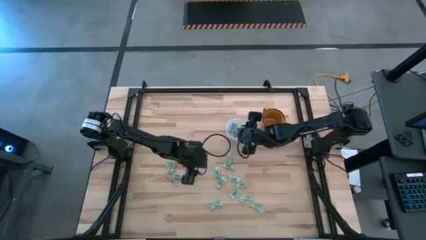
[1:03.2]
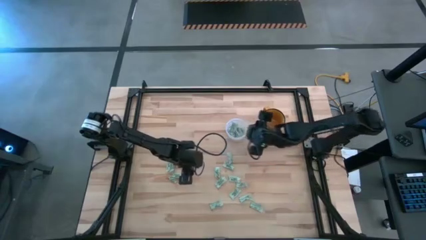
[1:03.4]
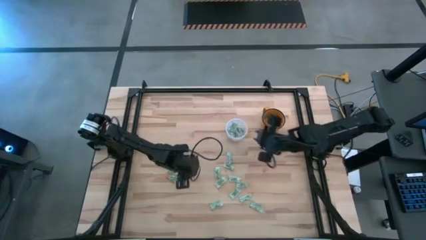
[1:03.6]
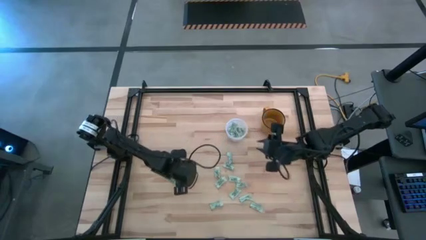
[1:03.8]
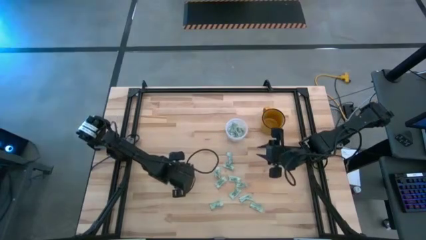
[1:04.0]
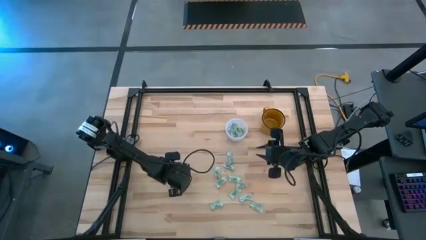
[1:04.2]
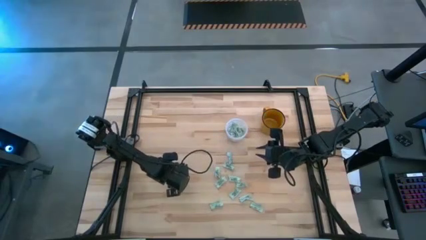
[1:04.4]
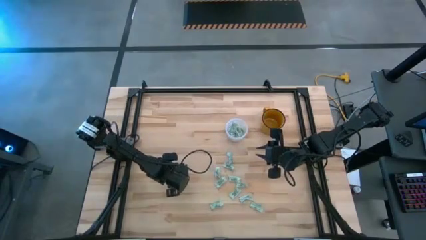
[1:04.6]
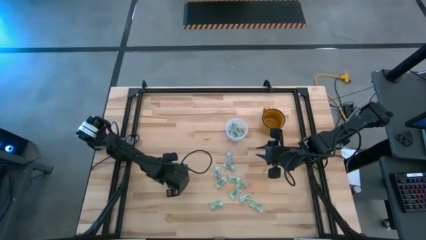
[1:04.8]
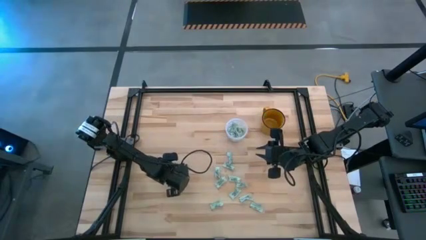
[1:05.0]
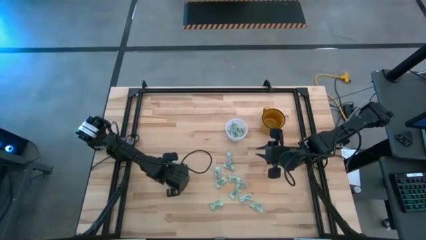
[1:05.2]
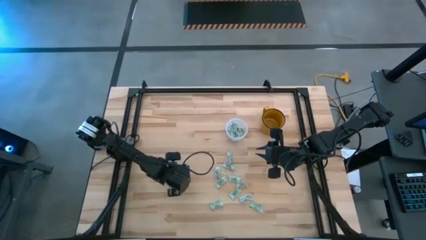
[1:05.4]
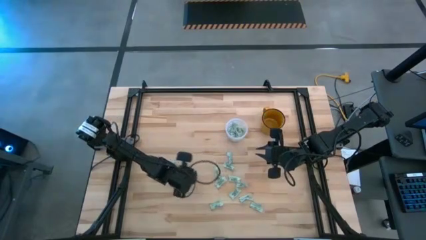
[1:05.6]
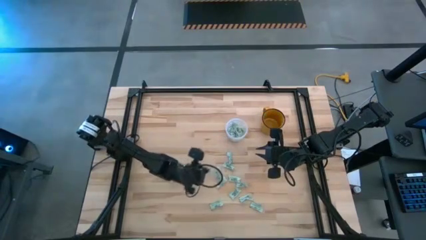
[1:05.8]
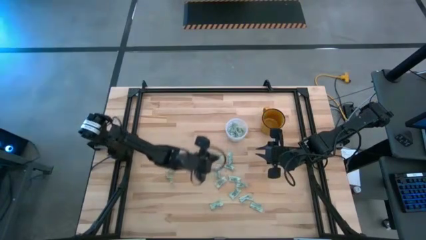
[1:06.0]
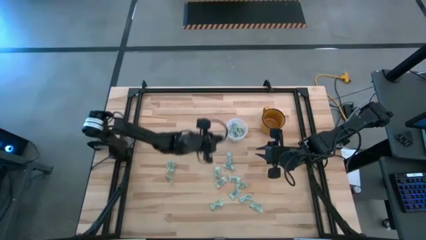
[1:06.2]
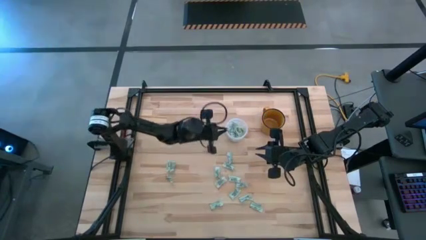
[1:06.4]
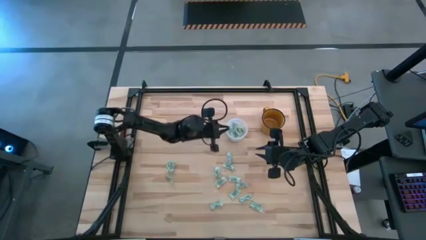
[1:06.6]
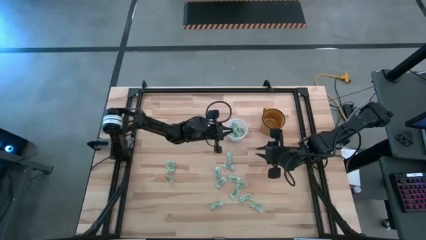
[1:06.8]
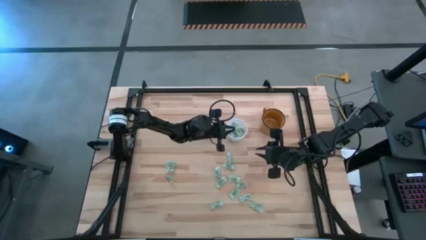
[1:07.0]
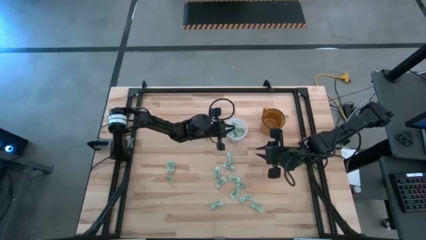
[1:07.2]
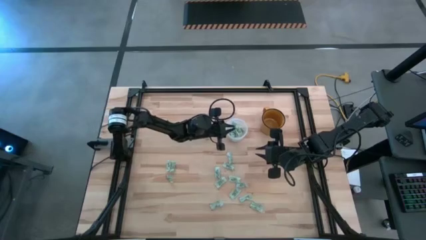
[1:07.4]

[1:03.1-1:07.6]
Task: Pick and place Stevia / Truvia into bins
Put the green stevia packet into the transparent bin

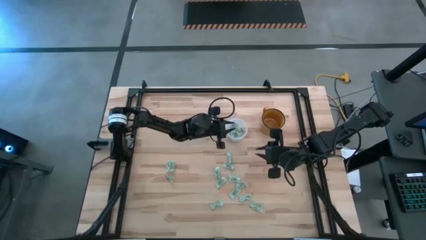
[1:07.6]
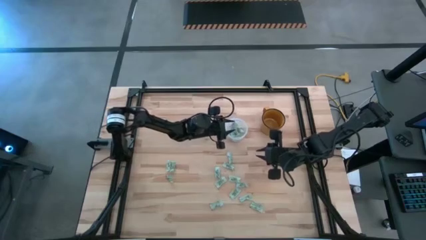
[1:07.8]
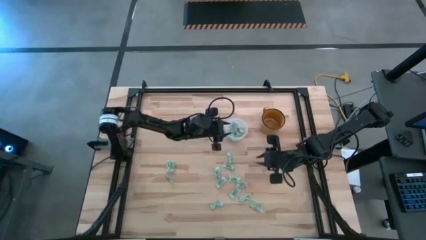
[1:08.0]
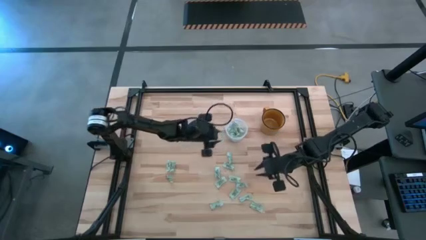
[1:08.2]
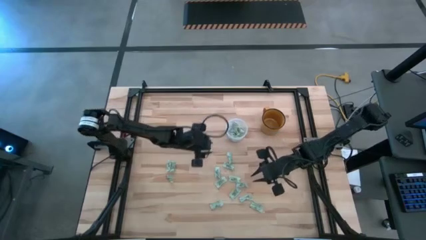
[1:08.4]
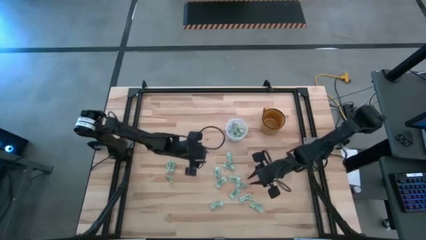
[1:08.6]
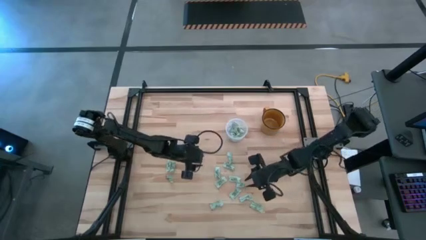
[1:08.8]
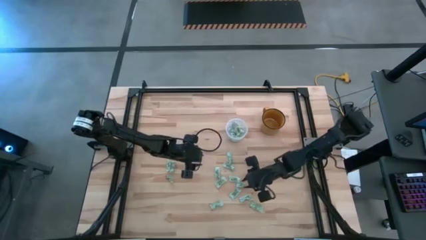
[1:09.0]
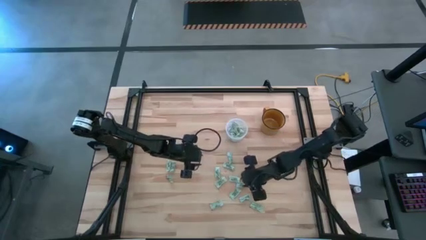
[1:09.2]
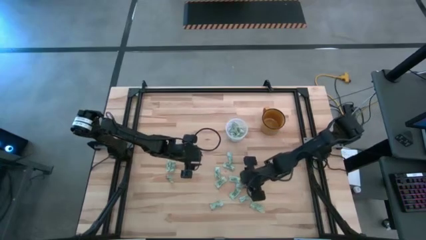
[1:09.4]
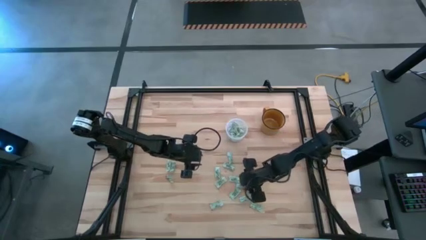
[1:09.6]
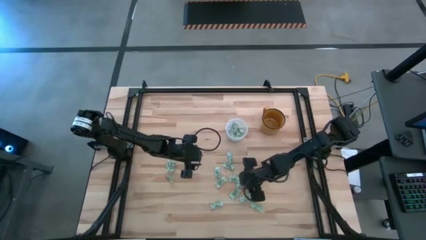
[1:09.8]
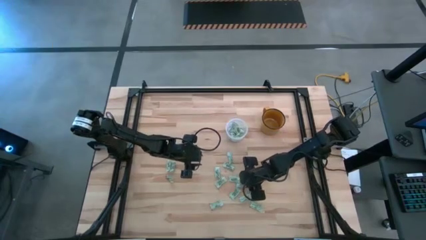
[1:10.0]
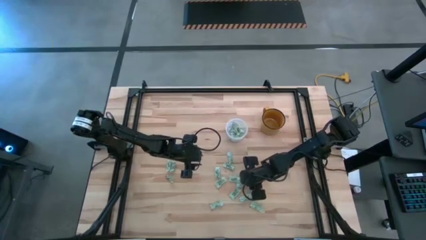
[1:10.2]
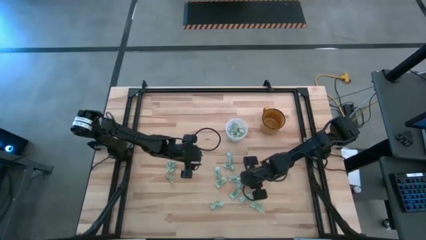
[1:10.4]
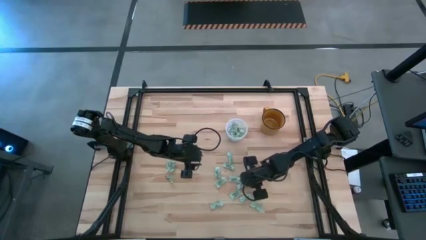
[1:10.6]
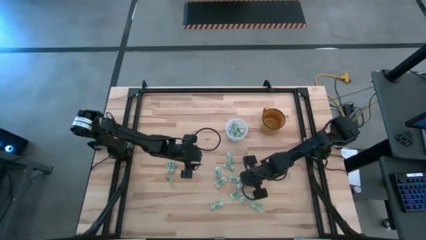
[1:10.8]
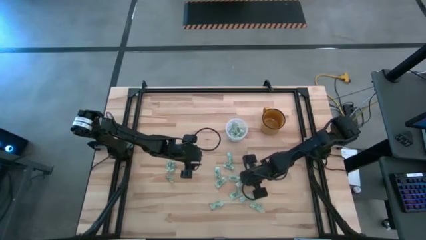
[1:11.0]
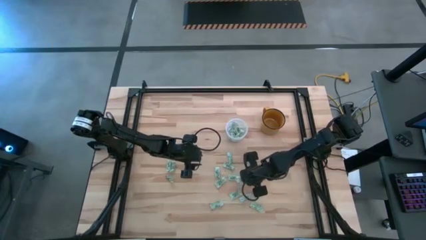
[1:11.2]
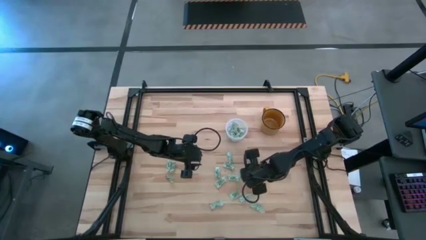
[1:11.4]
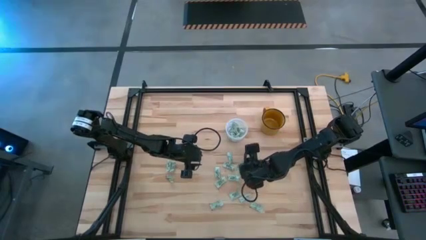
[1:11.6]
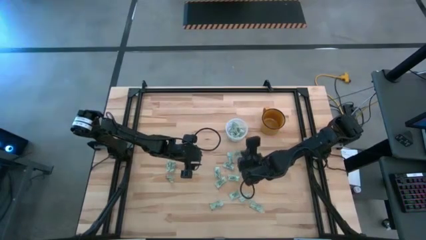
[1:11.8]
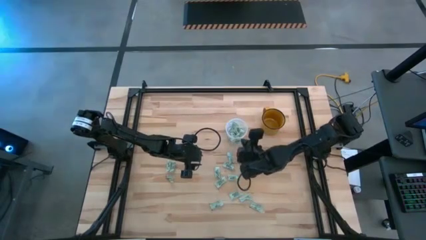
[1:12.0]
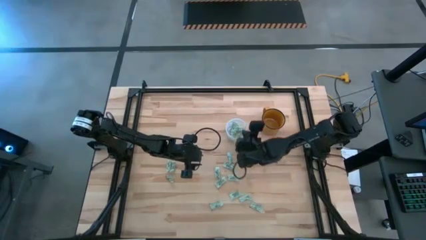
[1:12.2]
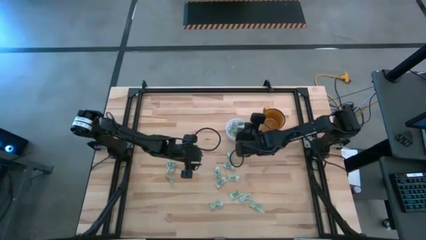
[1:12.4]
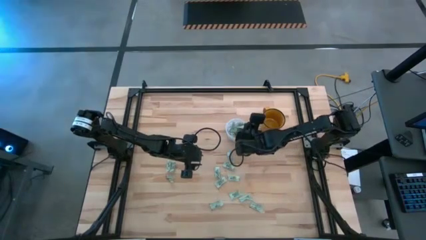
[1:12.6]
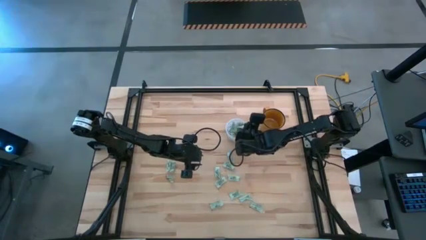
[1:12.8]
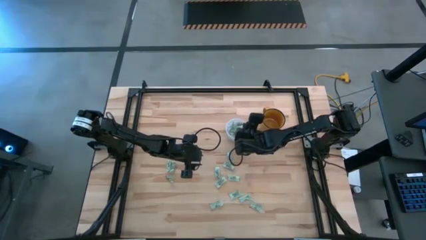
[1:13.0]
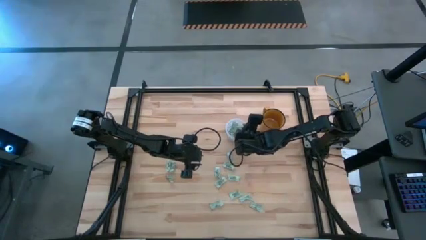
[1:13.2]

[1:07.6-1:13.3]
Put the green stevia packet into the transparent bin

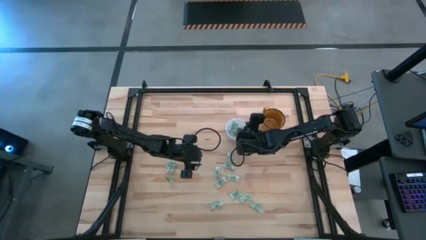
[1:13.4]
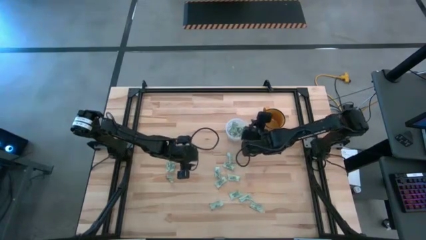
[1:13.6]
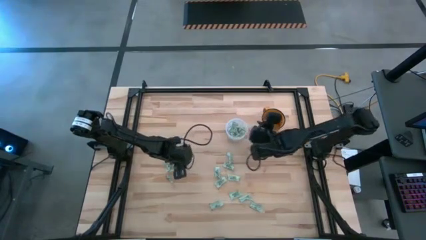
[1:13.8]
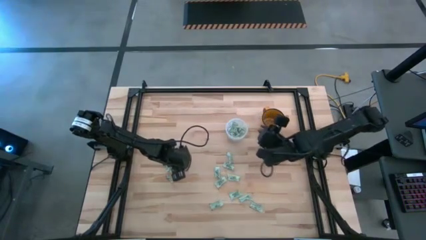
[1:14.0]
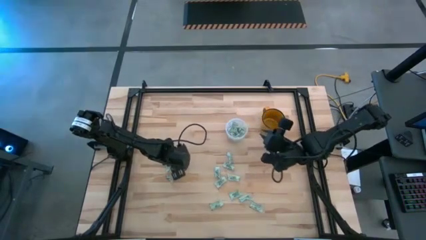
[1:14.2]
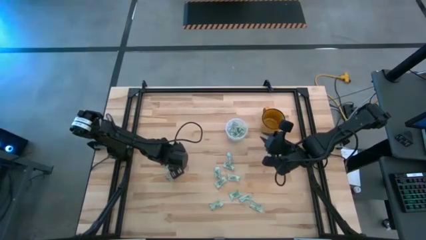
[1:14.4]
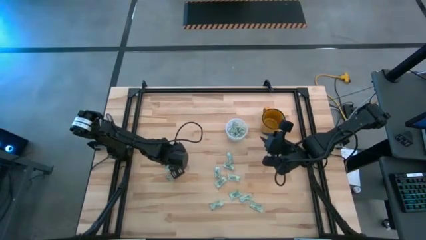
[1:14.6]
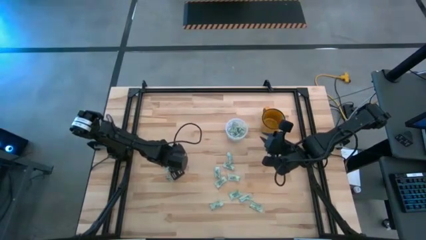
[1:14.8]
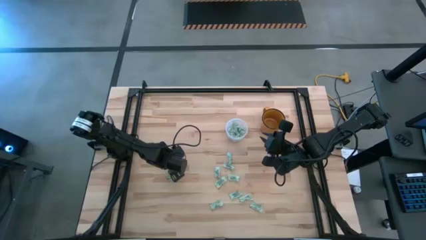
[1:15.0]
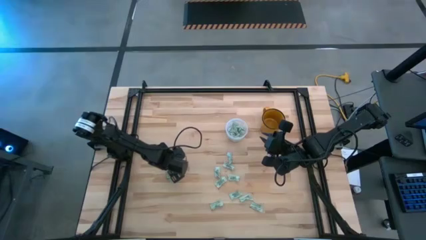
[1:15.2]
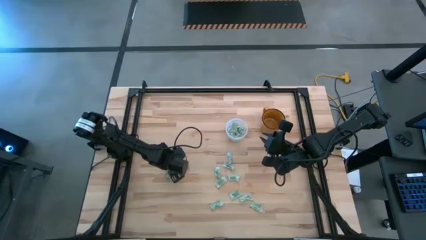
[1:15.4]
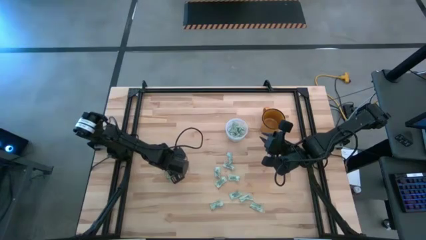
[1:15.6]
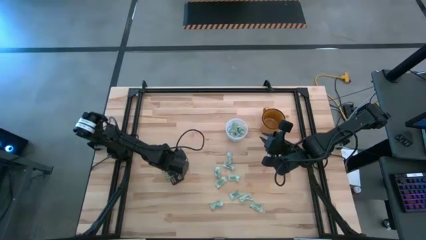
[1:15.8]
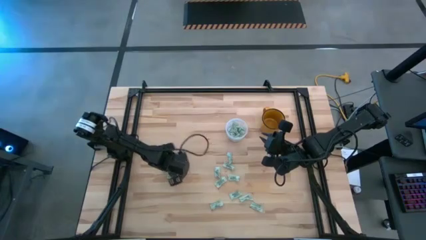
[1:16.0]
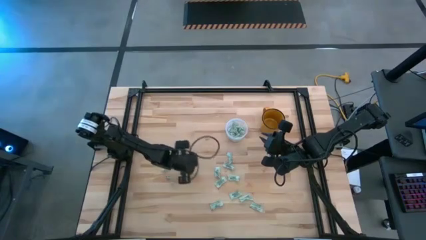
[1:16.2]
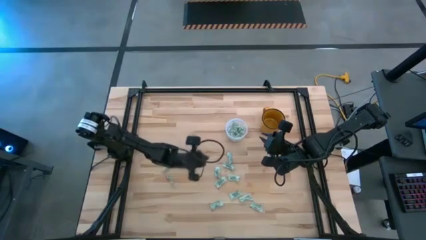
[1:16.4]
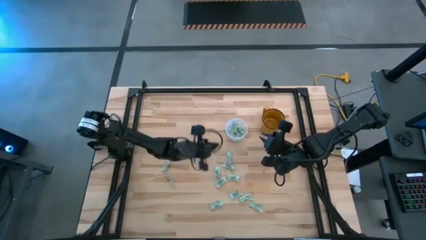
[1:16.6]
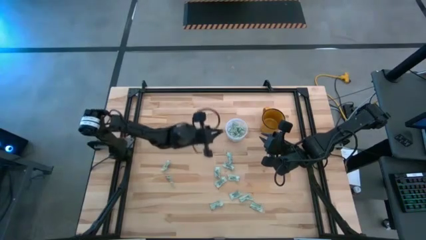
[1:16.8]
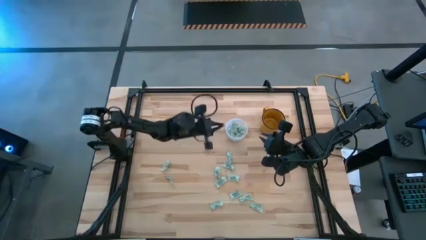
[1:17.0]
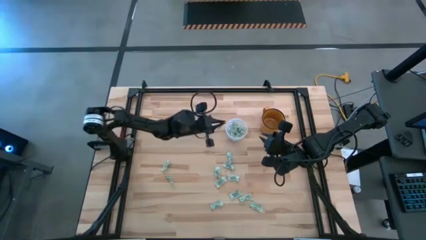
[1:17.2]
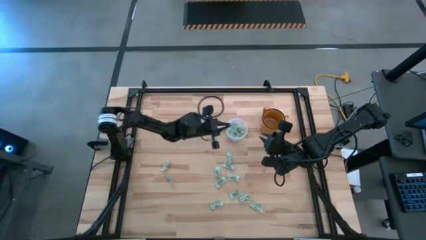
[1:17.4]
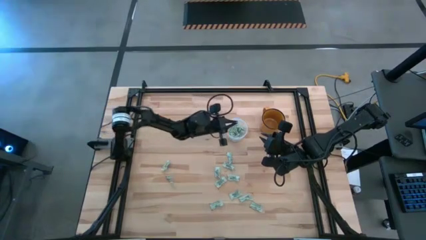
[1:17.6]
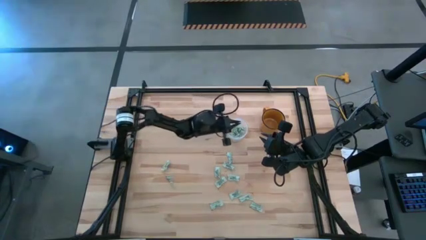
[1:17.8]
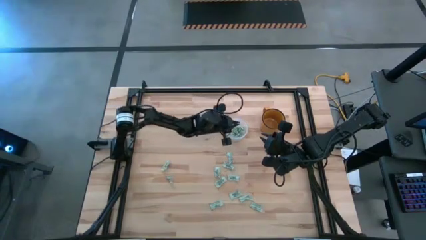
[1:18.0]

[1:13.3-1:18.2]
Put the green stevia packet into the transparent bin

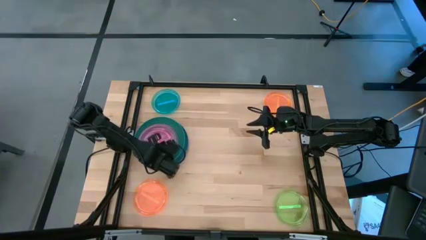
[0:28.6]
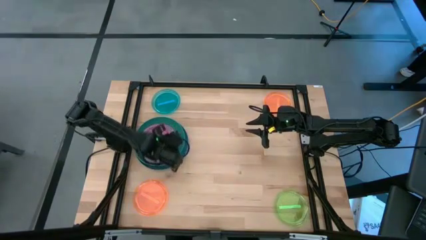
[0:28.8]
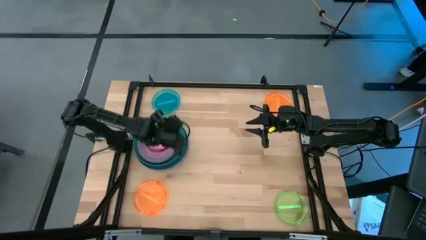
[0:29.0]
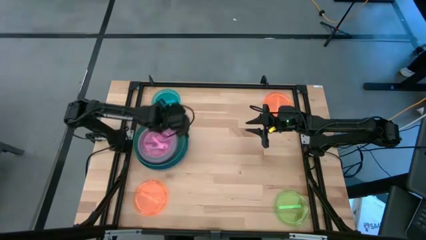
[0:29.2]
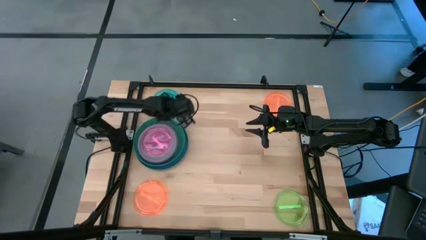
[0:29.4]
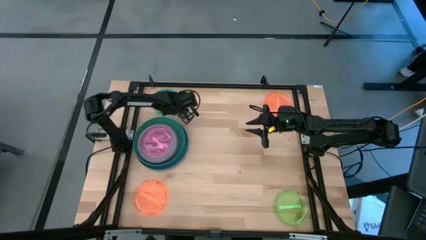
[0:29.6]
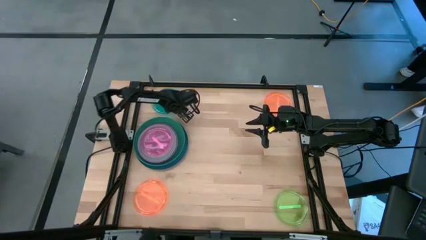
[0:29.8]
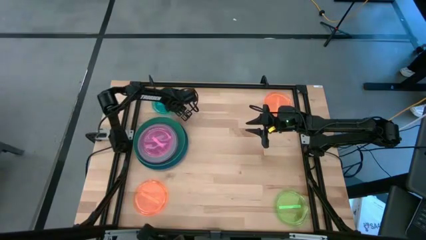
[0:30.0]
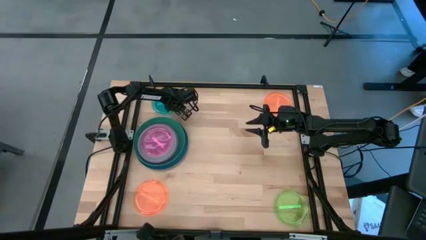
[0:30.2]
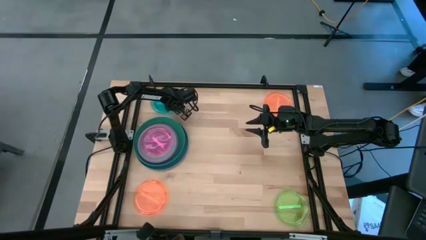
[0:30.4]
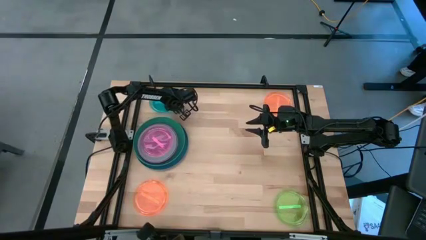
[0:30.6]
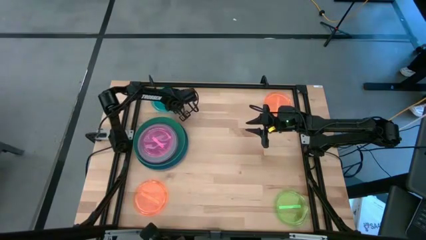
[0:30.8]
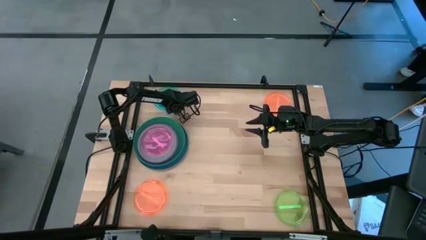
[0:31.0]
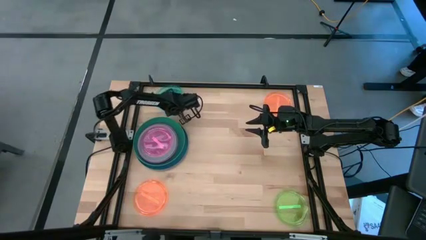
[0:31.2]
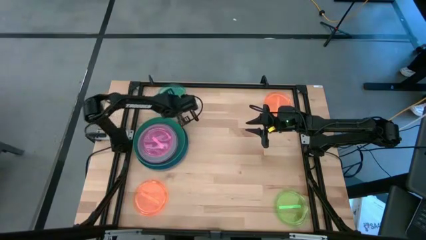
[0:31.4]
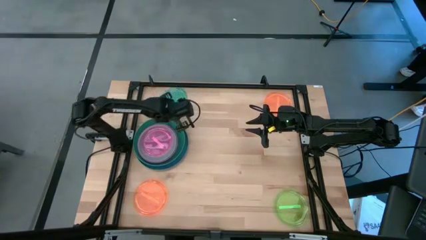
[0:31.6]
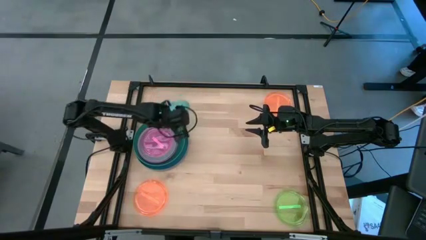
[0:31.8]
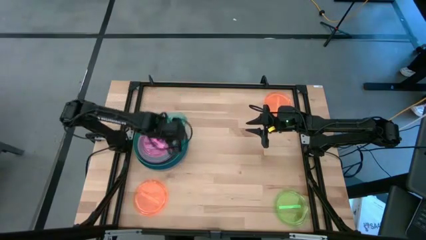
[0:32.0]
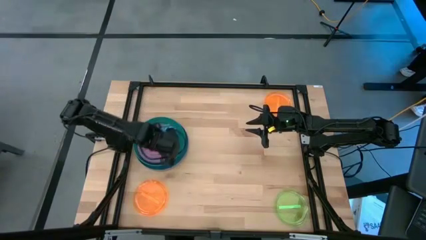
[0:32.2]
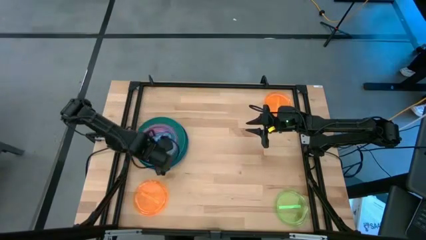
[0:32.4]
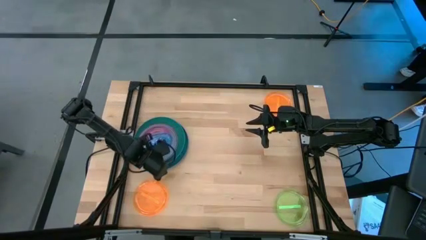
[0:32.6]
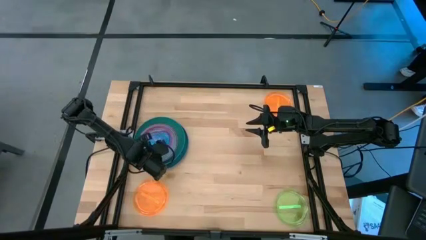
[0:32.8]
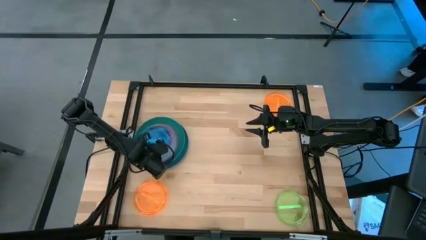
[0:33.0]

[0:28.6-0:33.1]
Task: Stack plastic plates
Stack the blue plate on top of the pink plate
